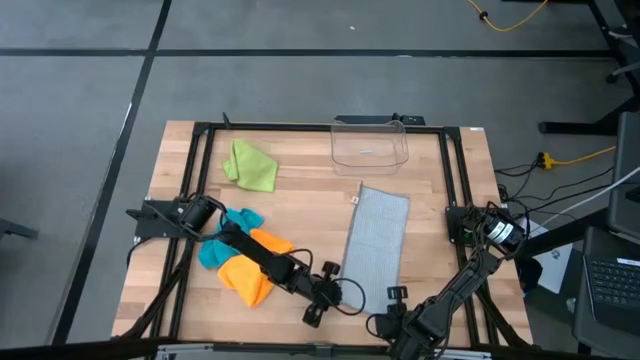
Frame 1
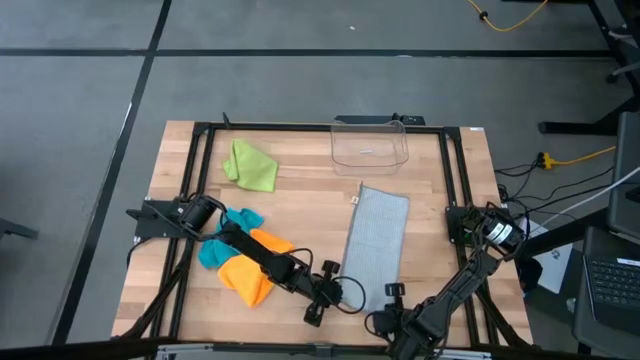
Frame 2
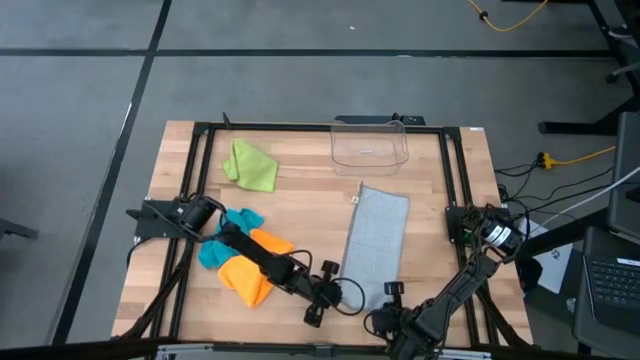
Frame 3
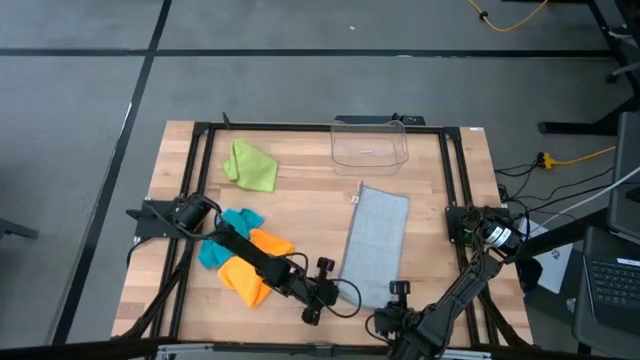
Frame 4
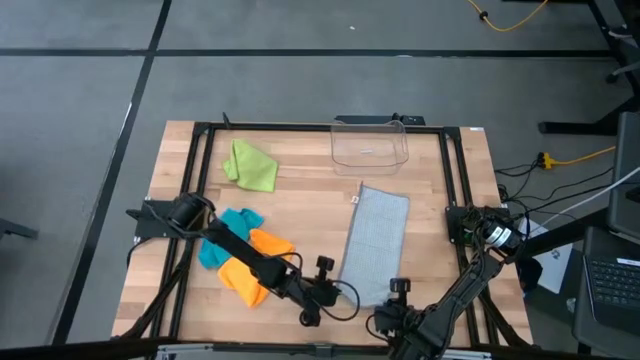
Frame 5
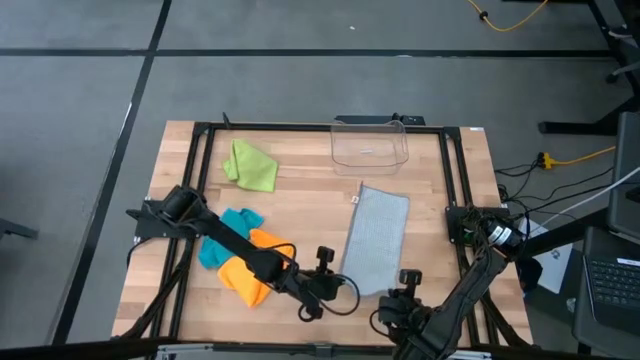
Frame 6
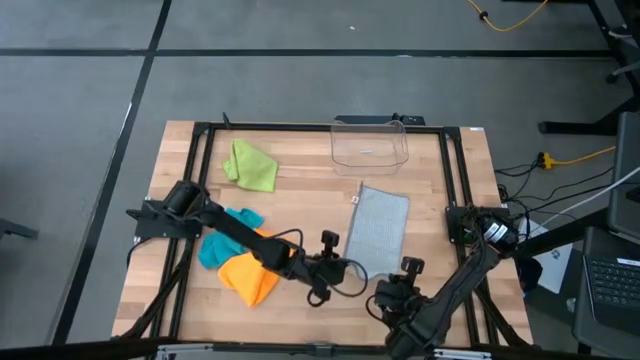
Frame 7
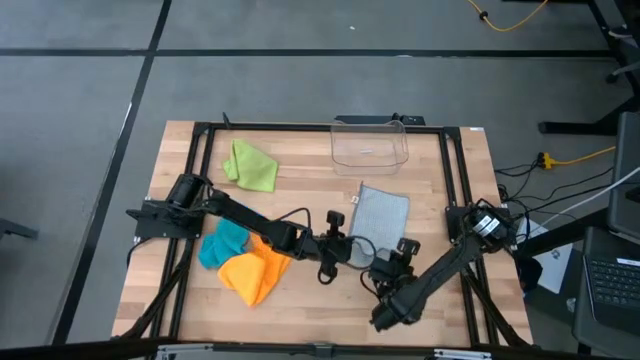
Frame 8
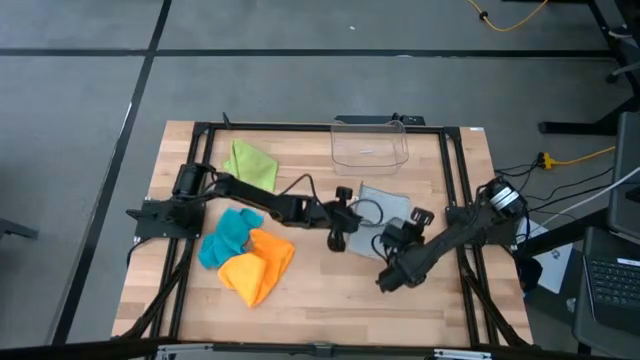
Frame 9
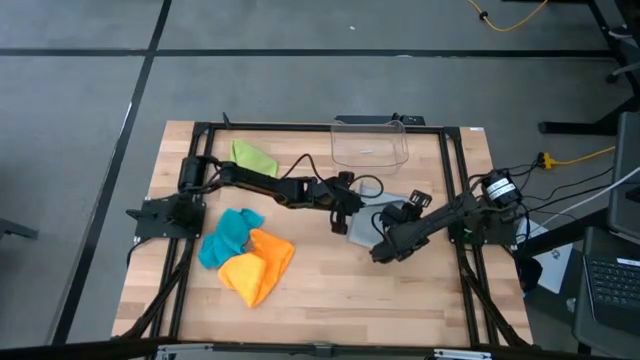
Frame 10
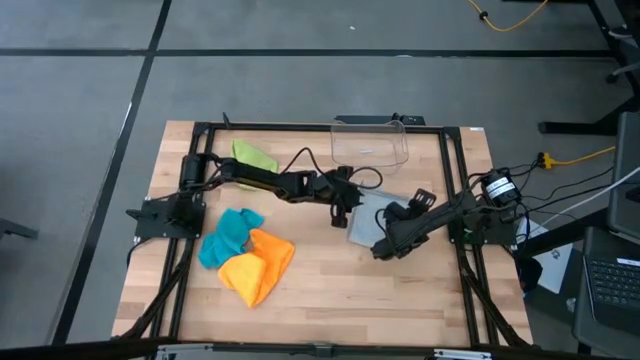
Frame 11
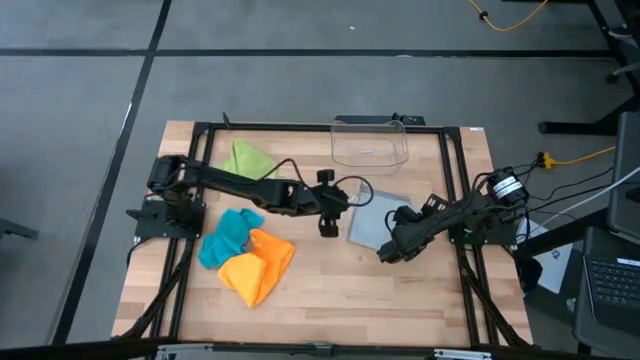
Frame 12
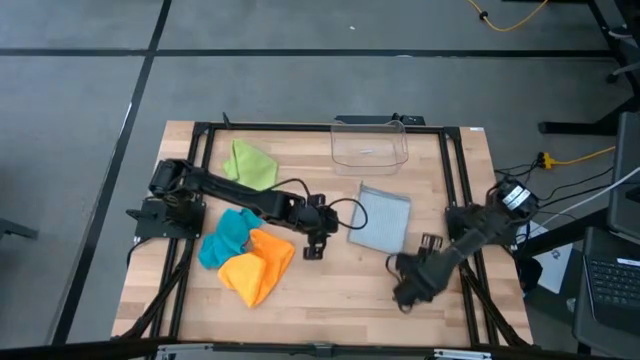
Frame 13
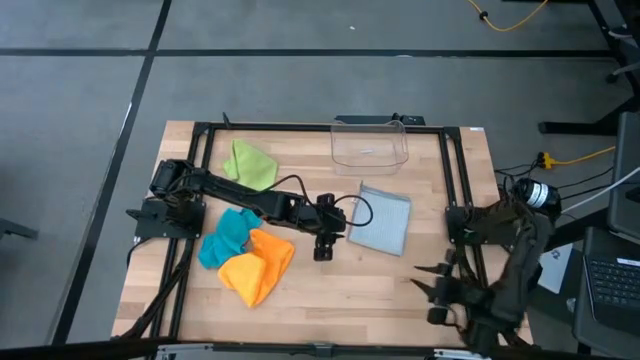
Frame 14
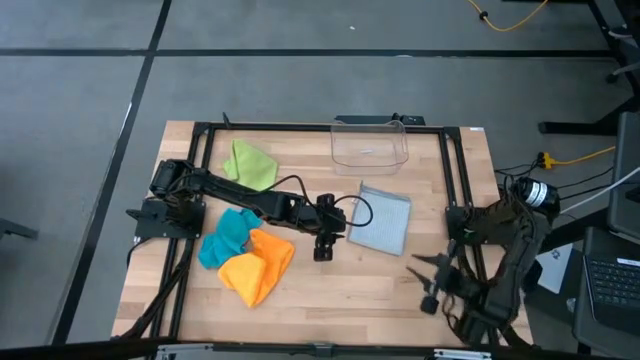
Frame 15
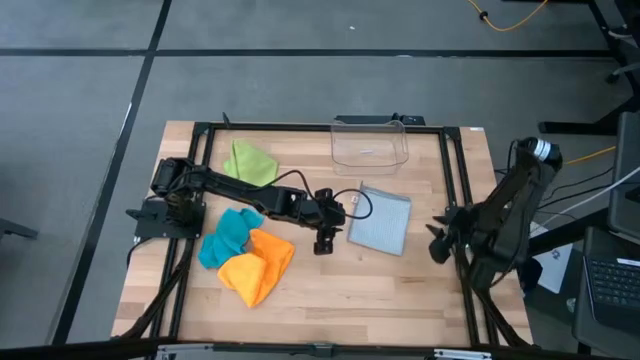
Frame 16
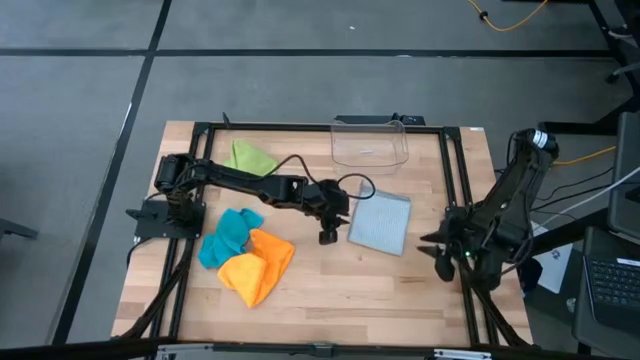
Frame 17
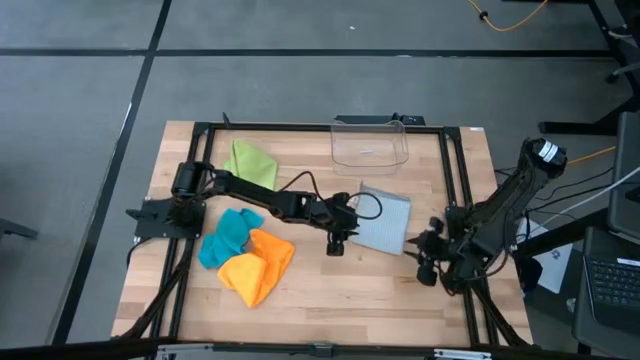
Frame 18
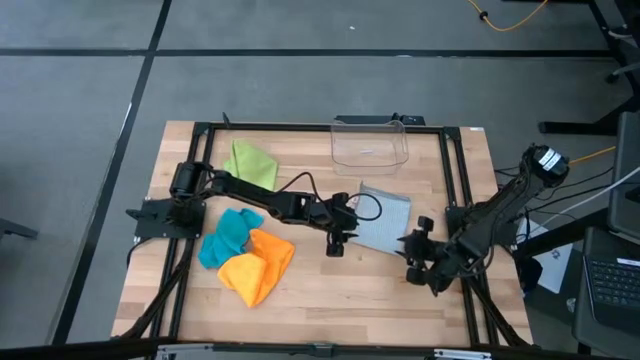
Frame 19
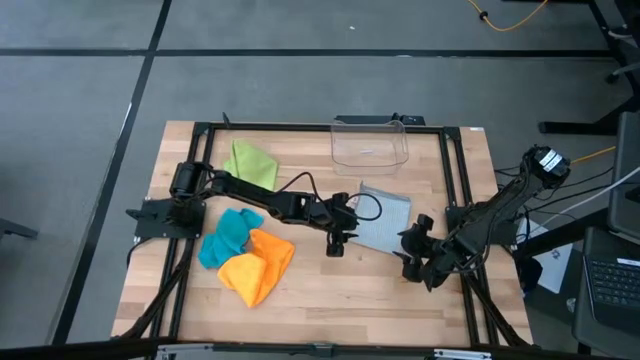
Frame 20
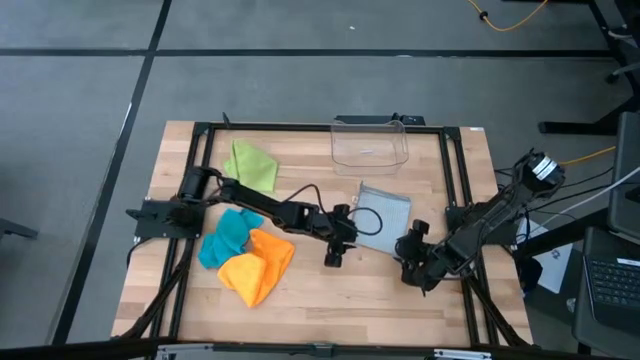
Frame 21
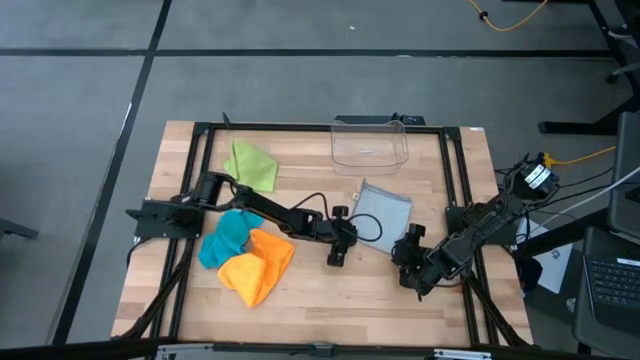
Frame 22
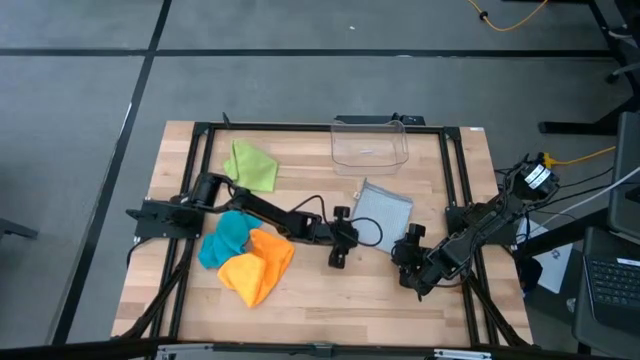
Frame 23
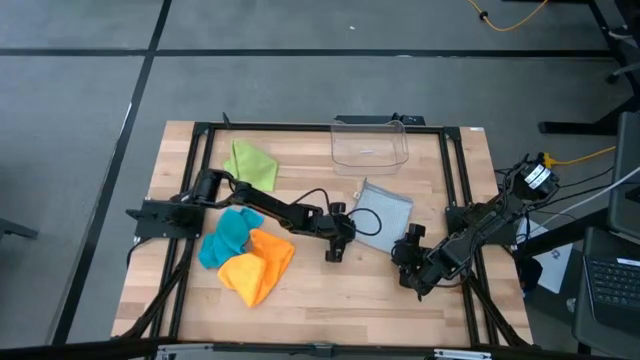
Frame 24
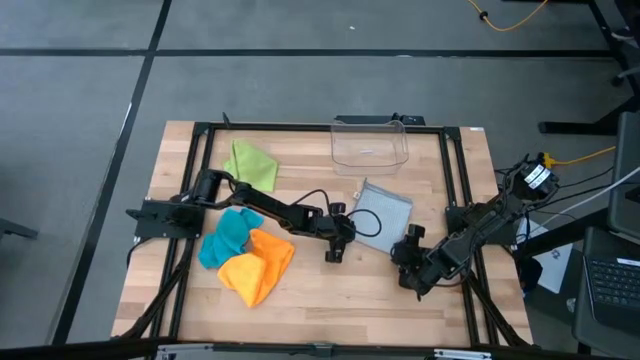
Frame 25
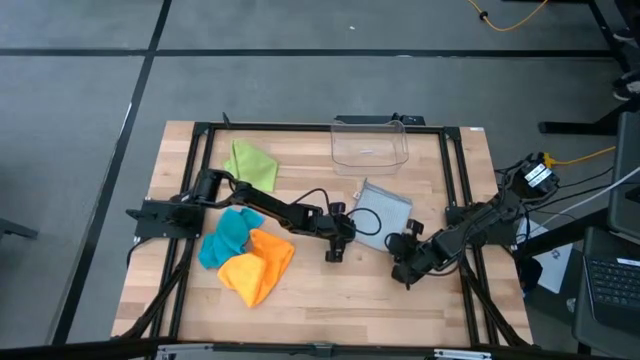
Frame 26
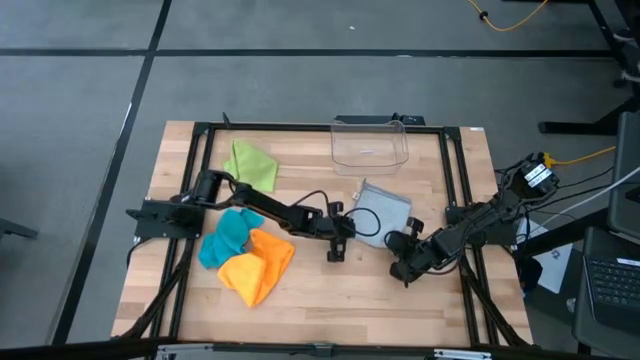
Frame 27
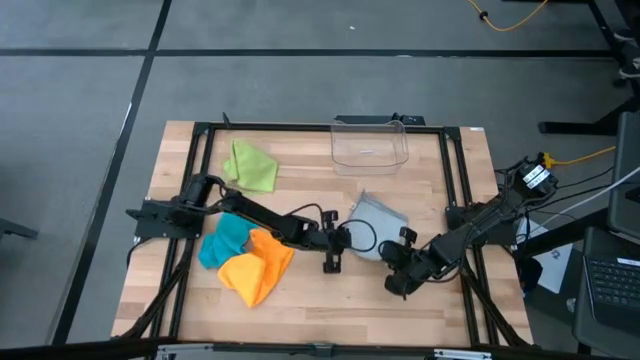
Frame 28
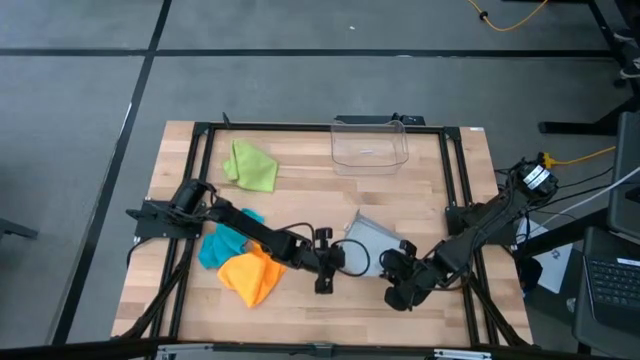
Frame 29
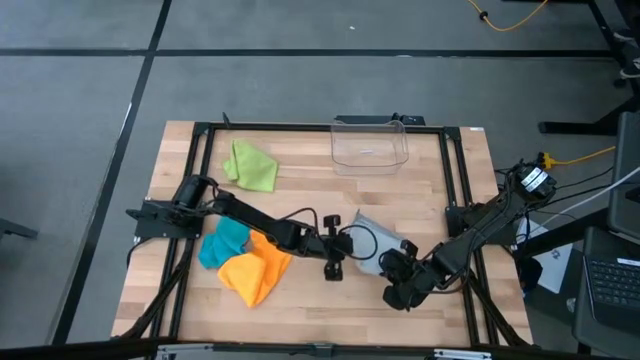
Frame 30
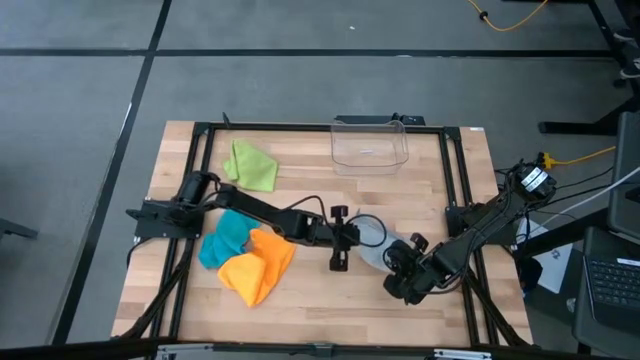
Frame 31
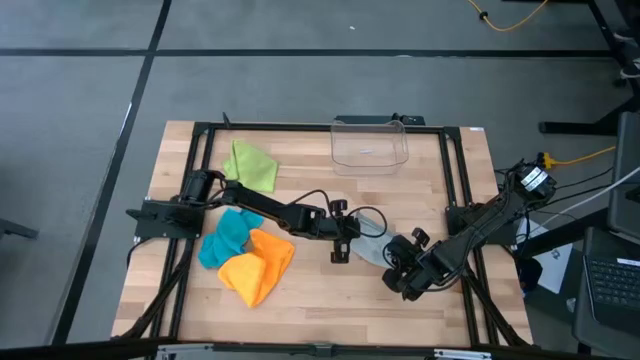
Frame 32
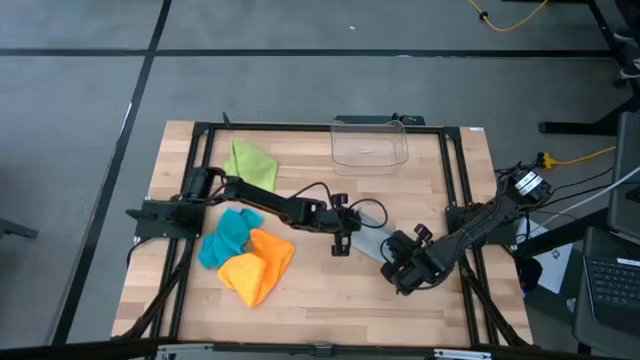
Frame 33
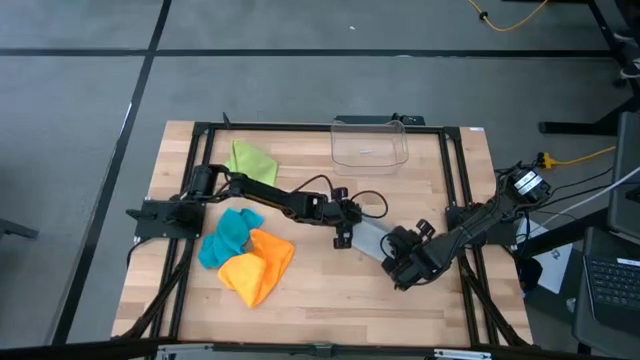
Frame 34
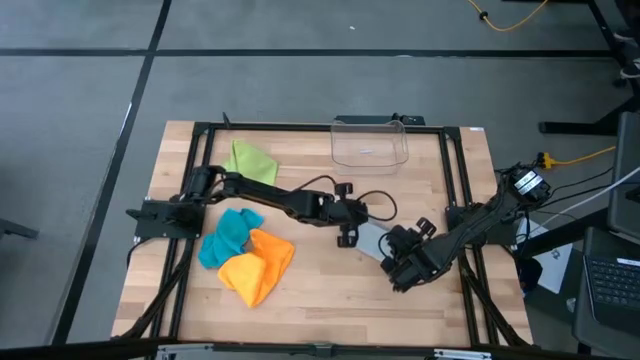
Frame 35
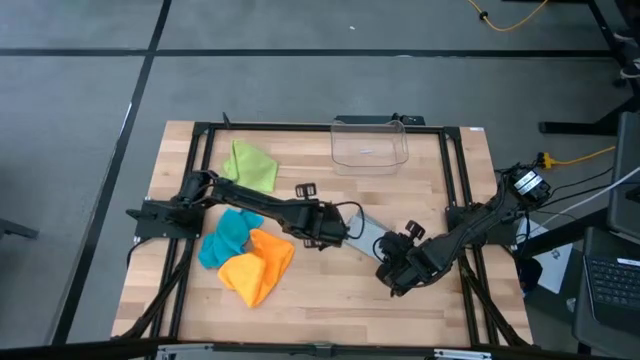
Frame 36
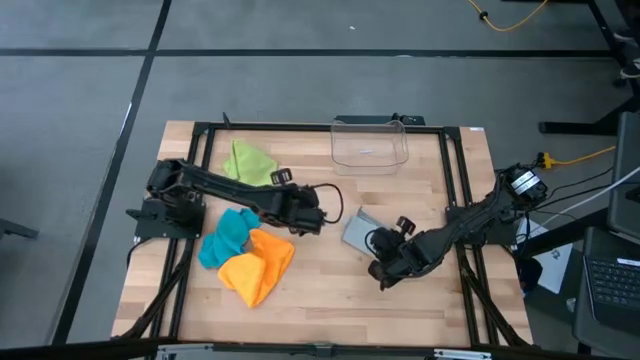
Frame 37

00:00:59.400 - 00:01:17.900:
Task: Fold microfiber towels
Fold the gray microfiber

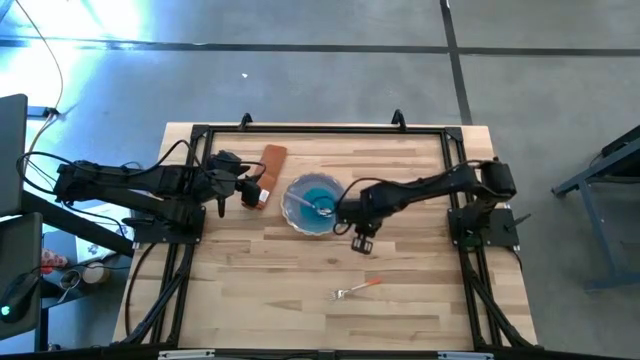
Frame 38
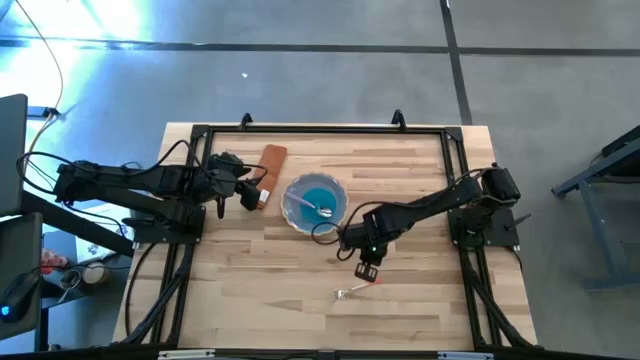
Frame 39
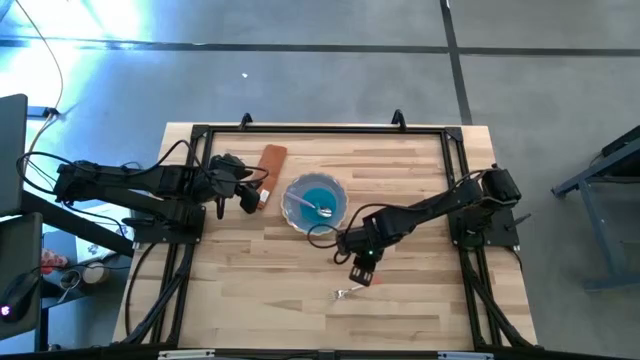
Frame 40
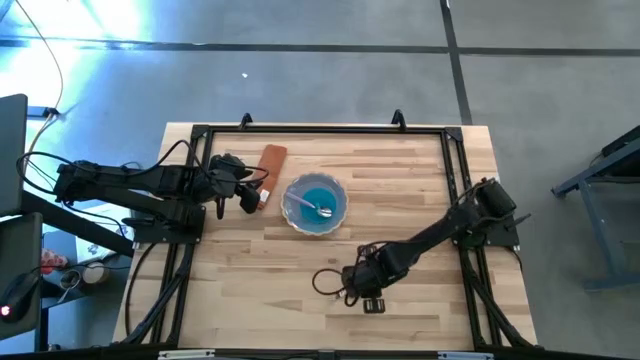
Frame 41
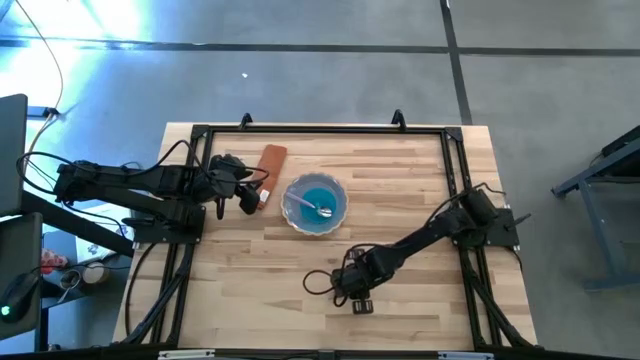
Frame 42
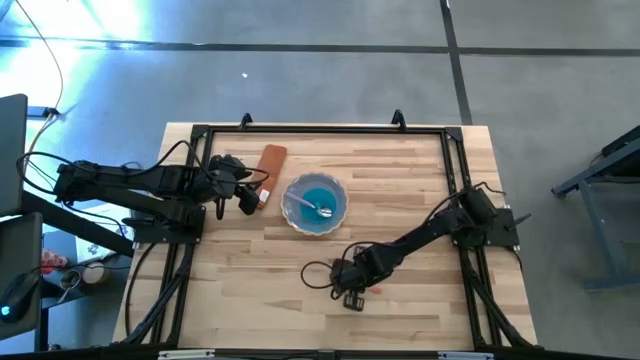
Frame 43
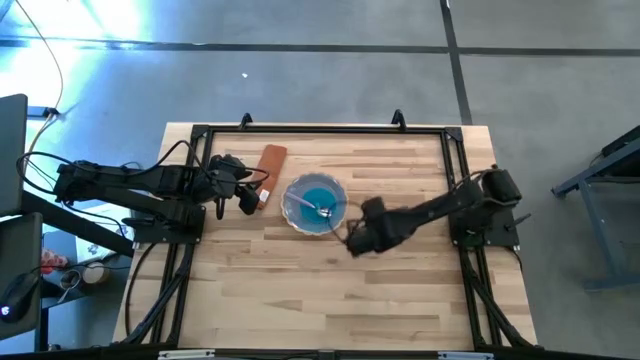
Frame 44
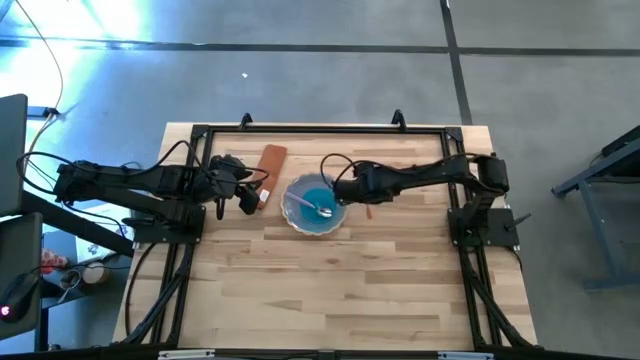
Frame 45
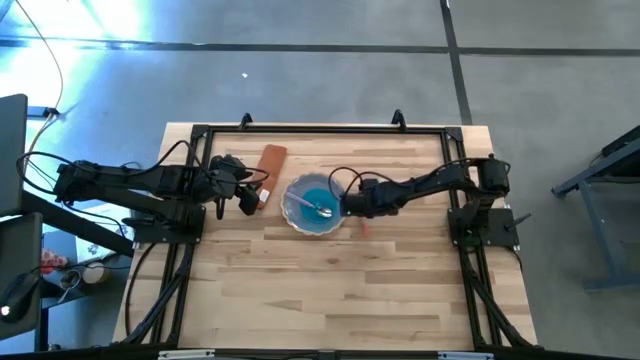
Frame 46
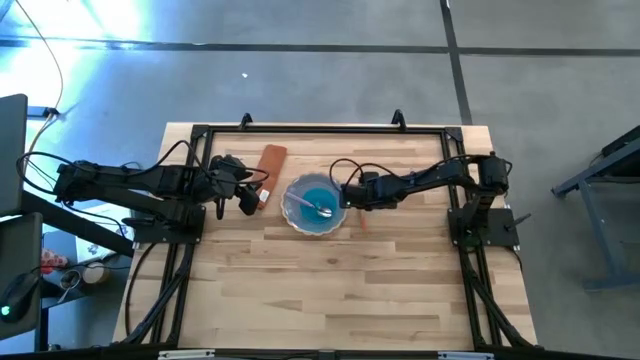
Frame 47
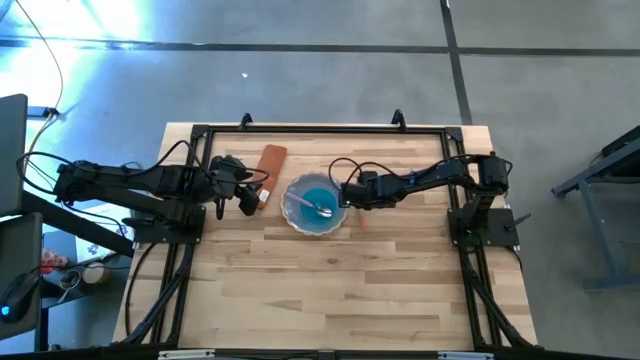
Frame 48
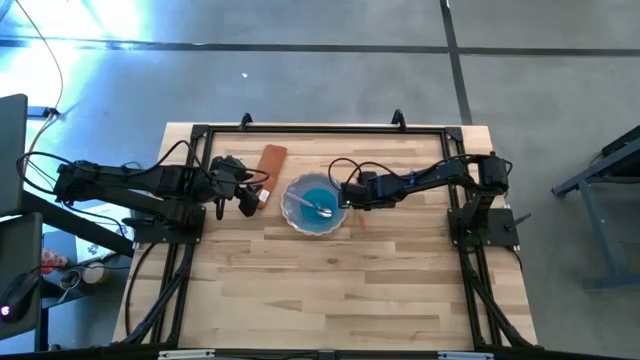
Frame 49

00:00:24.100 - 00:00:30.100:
Task: Set table place
Put the orange fork to the right of the light blue plate
